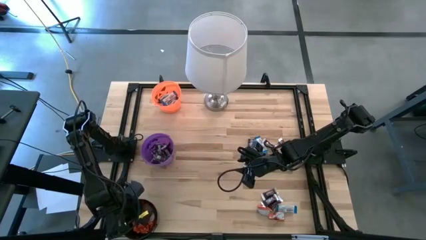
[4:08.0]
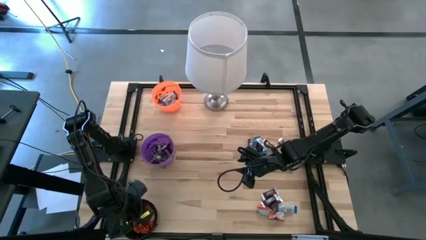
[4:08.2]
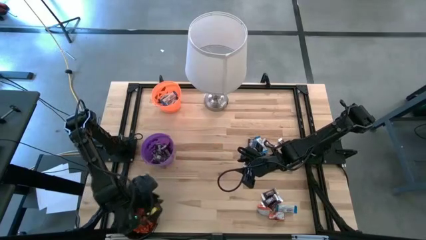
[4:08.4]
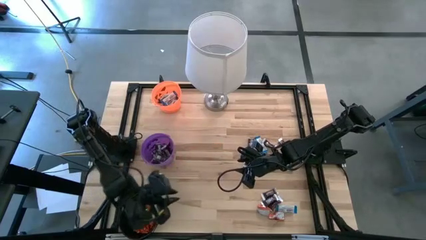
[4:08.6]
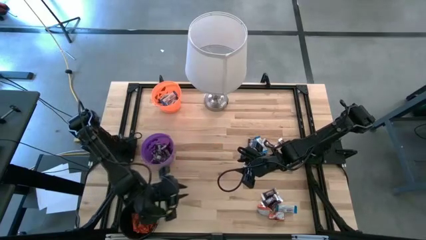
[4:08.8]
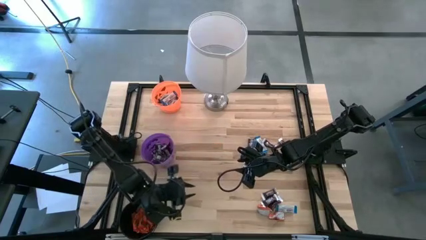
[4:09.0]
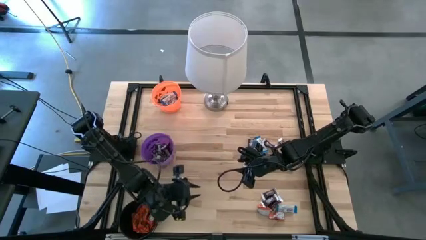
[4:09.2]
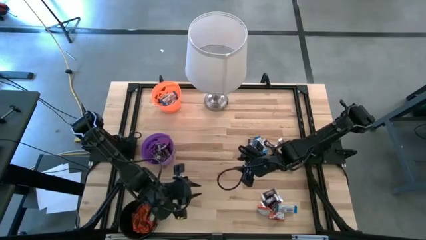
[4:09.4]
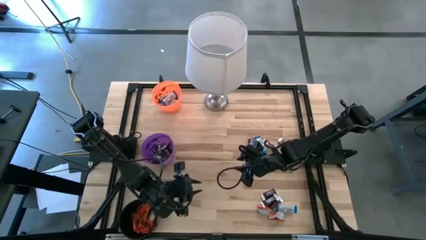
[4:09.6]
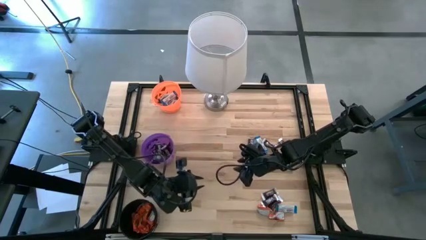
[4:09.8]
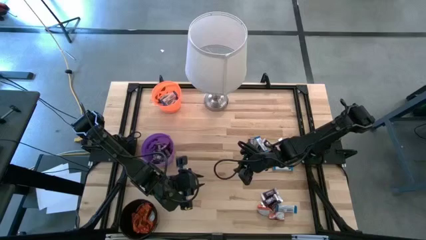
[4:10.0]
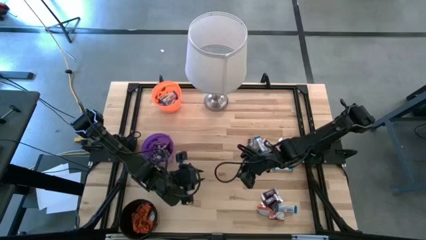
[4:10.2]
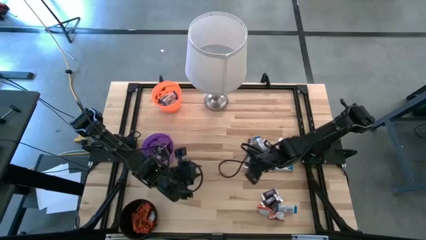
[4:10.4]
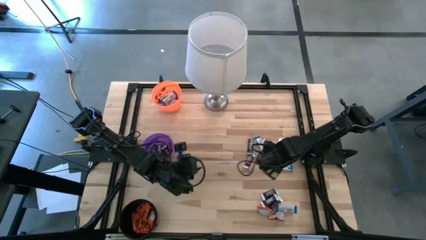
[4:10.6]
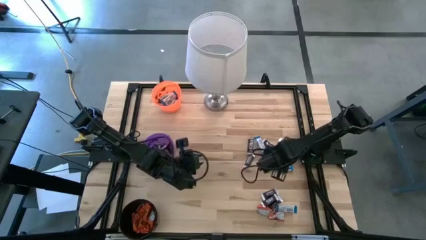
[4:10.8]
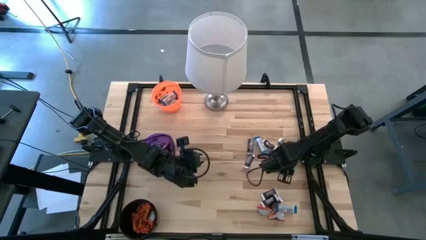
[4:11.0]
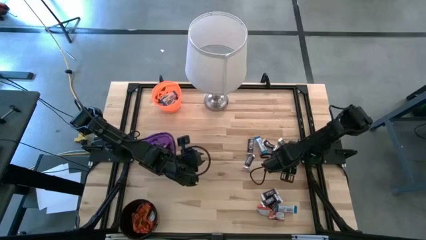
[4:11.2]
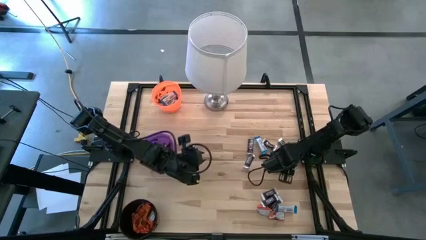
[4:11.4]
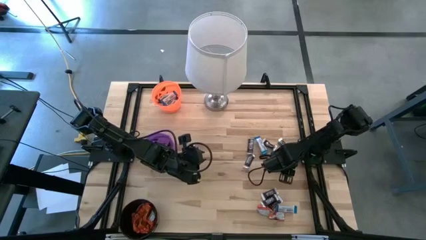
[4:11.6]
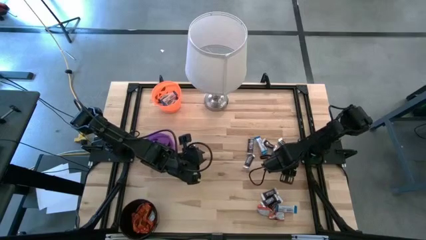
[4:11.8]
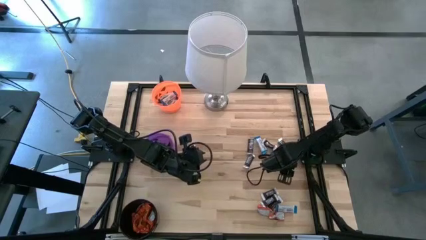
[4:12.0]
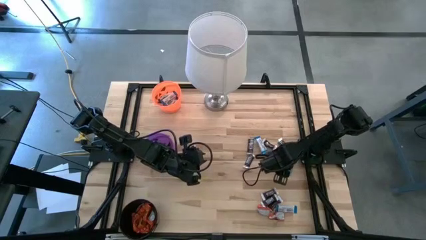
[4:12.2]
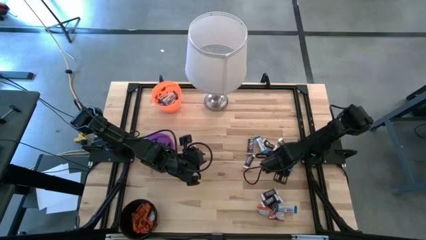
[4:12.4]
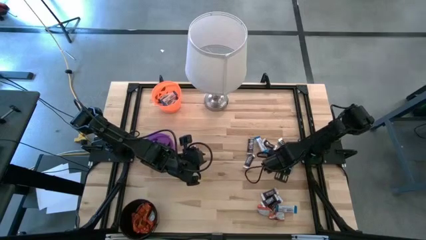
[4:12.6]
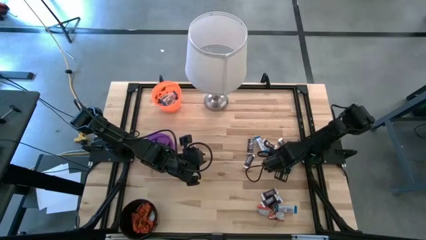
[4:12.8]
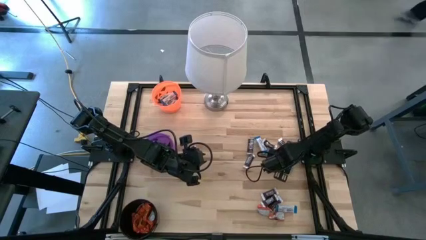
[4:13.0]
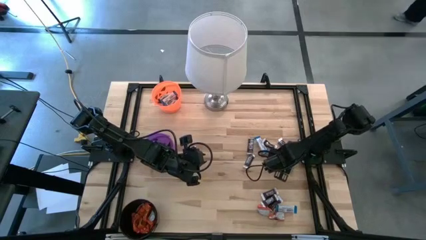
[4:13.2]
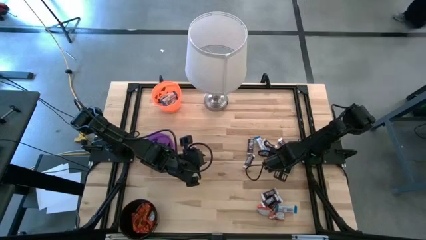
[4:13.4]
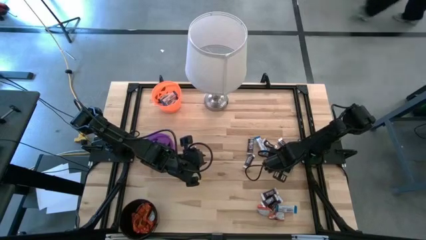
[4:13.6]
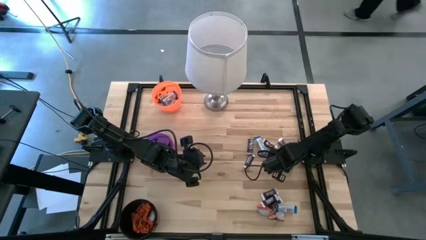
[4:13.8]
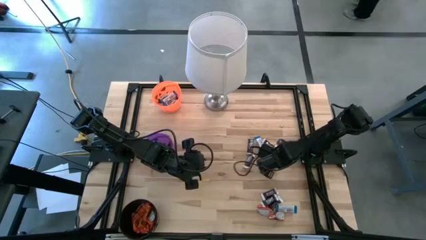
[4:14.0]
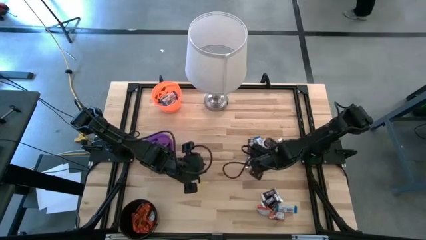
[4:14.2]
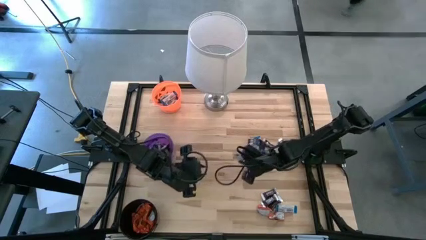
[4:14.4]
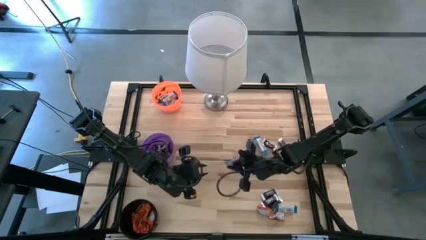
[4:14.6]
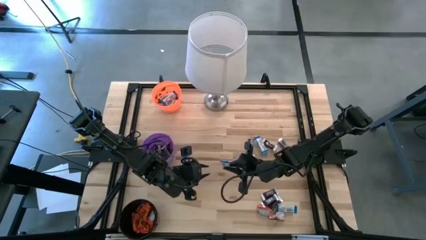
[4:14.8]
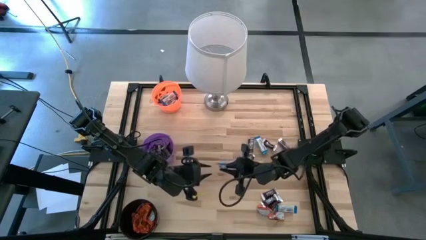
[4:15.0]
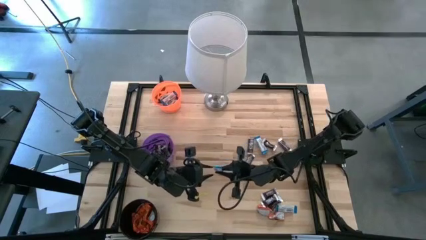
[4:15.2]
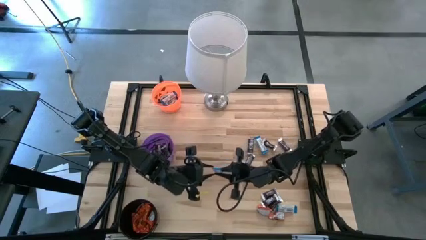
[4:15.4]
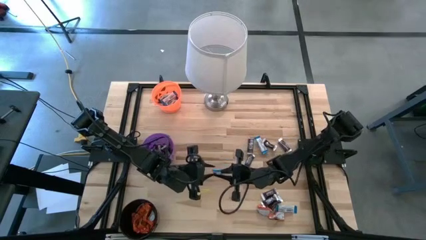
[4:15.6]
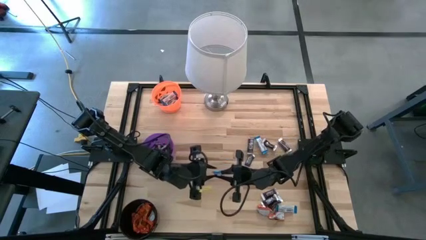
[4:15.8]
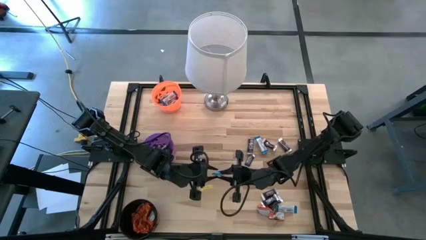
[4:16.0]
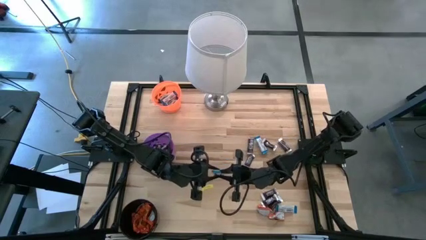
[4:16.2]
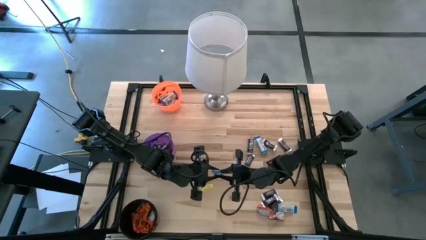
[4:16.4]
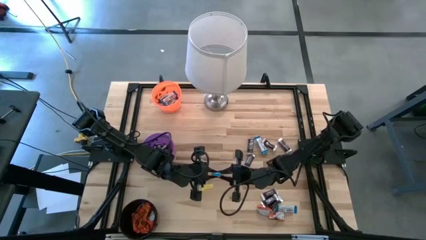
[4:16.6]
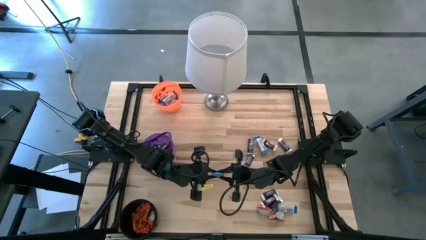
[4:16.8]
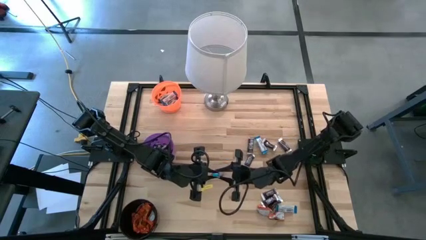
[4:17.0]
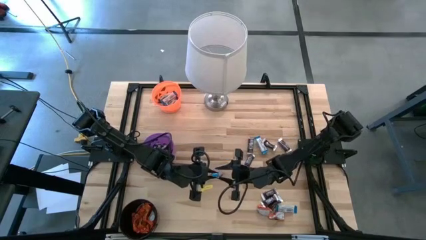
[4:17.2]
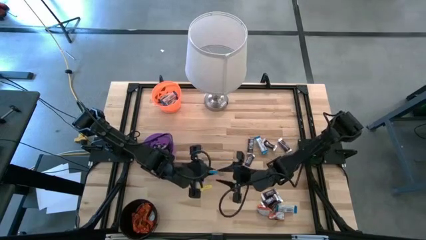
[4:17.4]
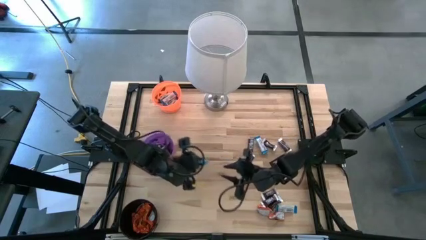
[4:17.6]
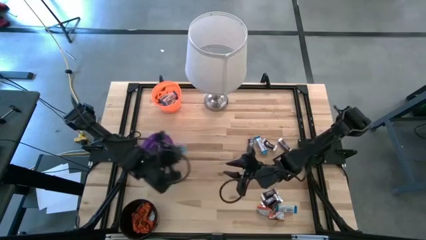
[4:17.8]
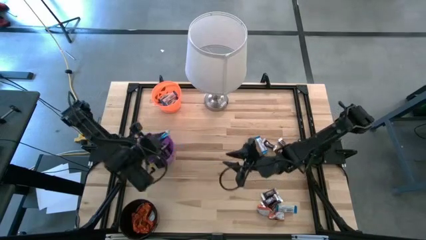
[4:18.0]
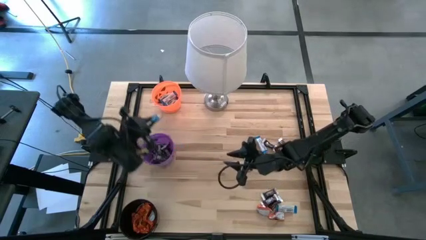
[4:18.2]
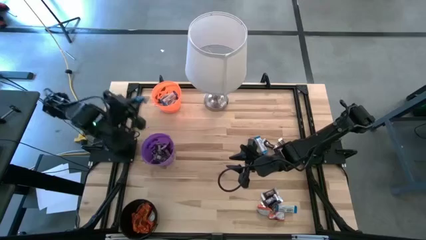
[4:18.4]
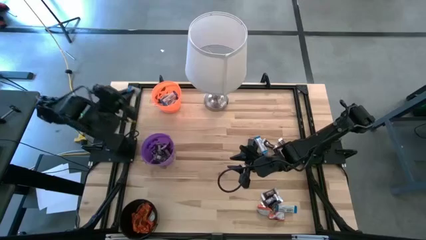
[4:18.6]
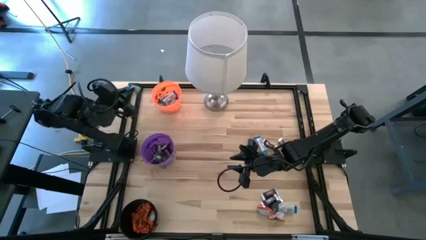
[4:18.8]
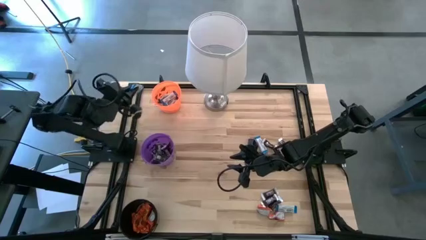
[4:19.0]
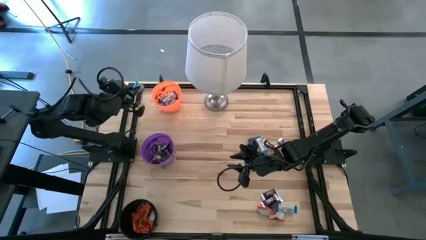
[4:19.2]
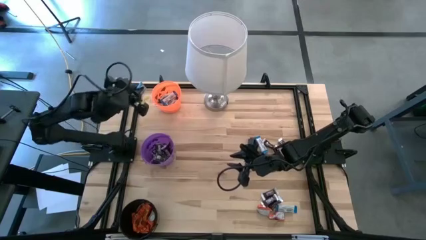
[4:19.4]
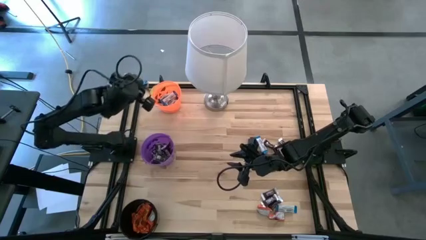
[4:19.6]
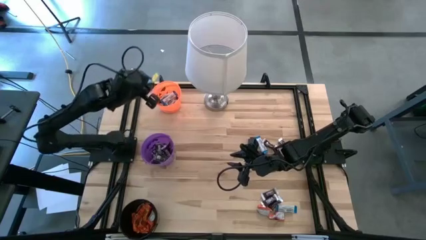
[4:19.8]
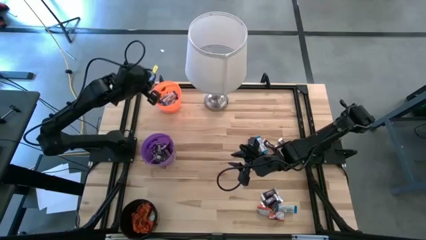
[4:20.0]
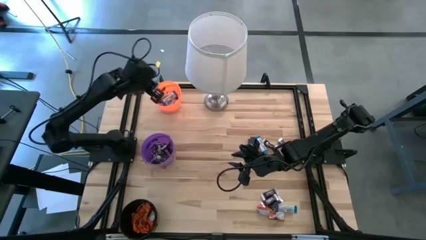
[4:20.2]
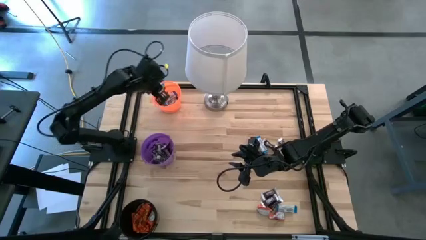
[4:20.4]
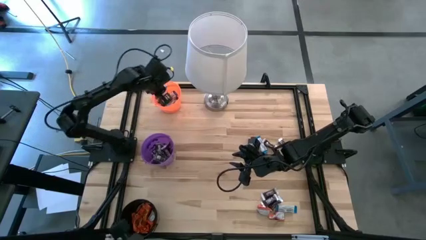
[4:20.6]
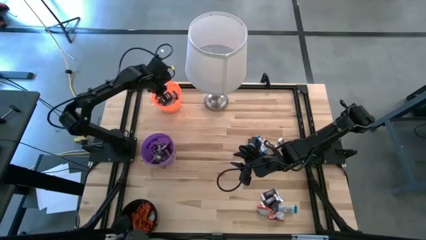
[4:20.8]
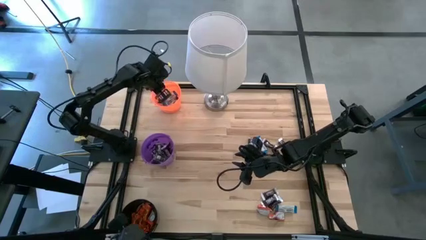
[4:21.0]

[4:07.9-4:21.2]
Task: Sort candy
Put the white chocolate into the orange bucket
